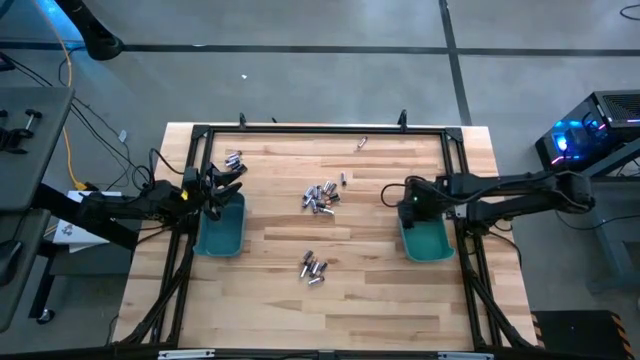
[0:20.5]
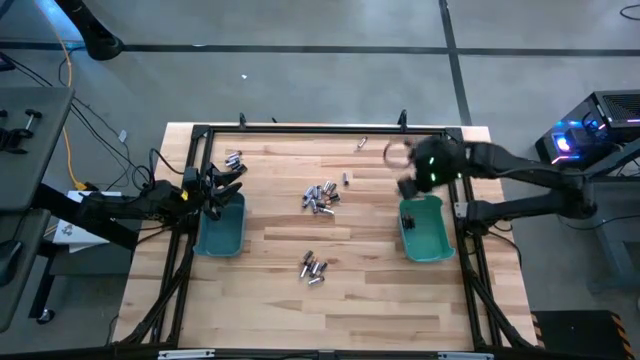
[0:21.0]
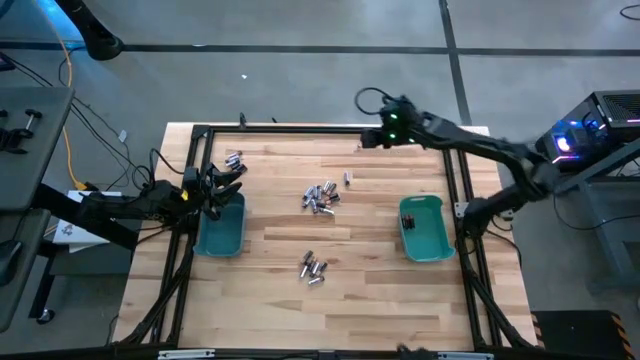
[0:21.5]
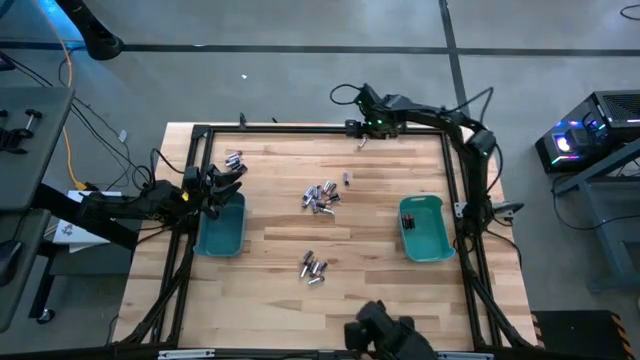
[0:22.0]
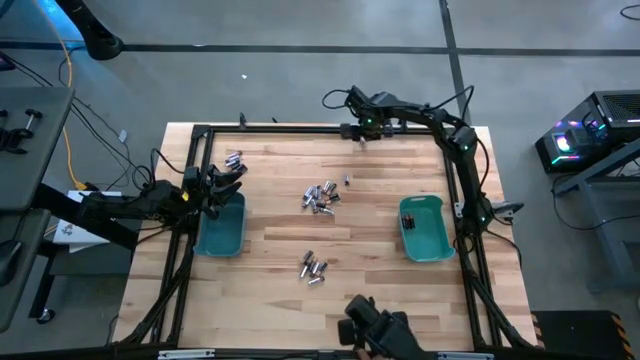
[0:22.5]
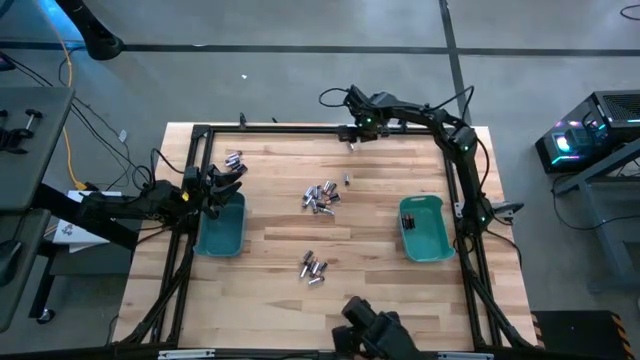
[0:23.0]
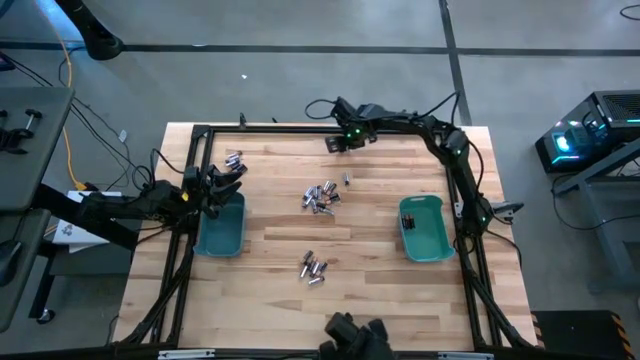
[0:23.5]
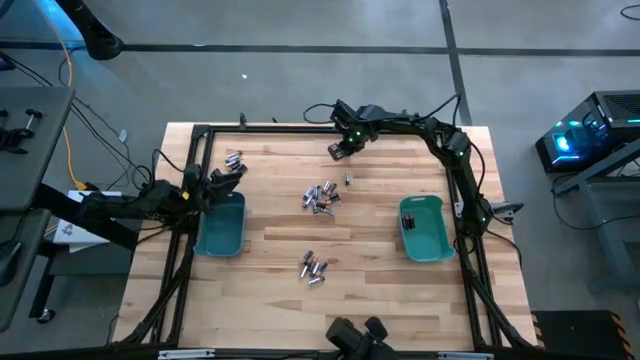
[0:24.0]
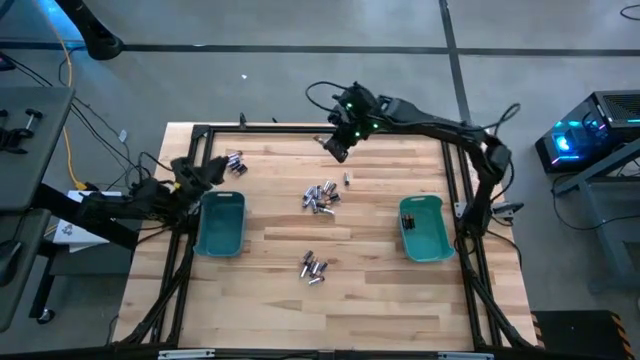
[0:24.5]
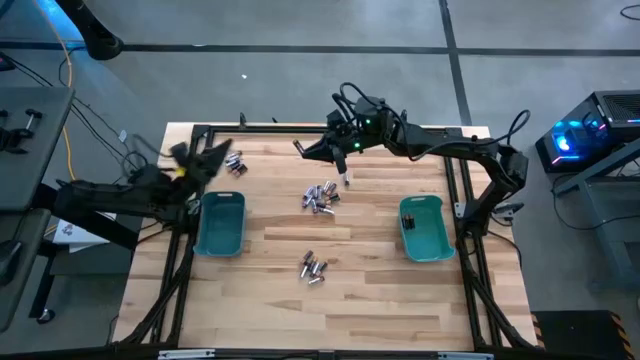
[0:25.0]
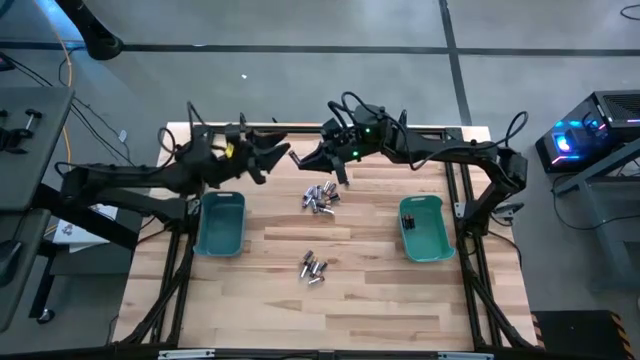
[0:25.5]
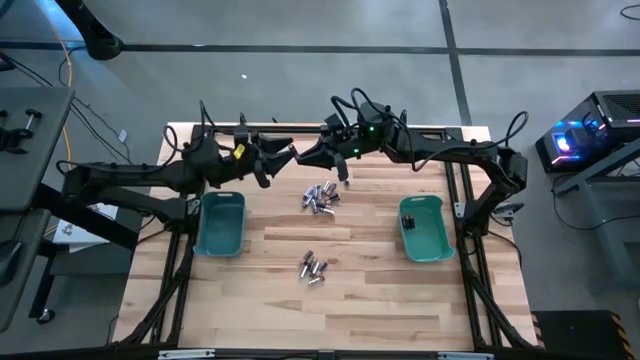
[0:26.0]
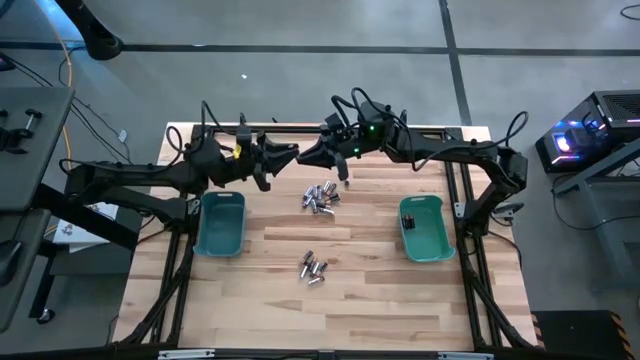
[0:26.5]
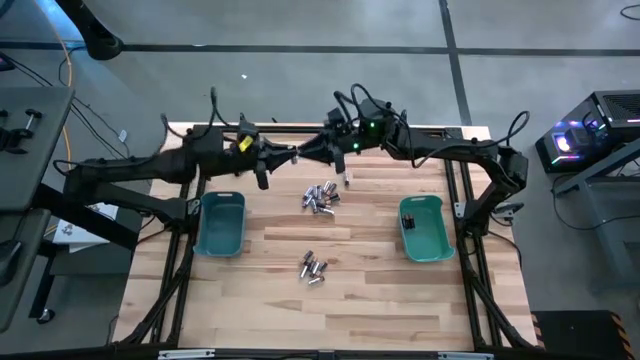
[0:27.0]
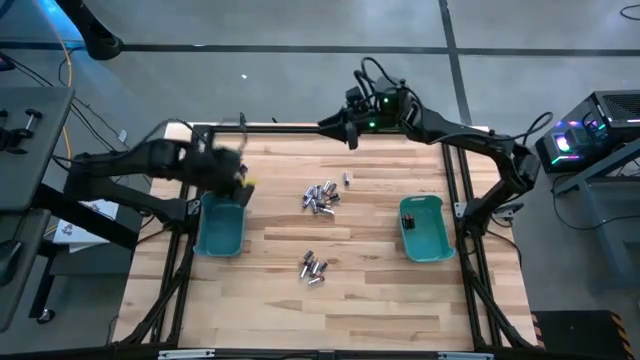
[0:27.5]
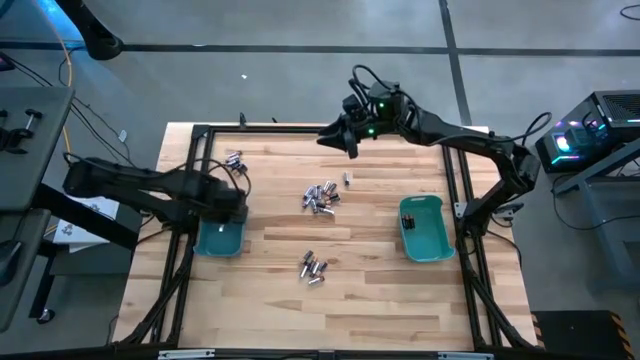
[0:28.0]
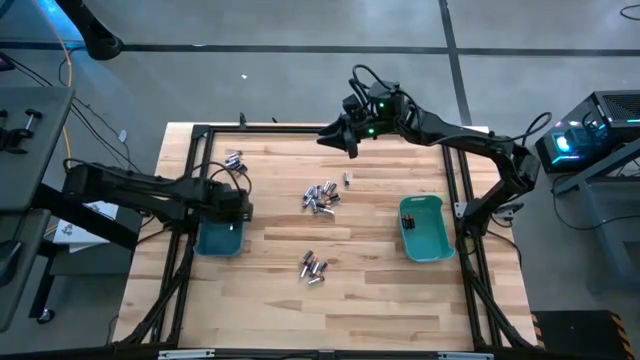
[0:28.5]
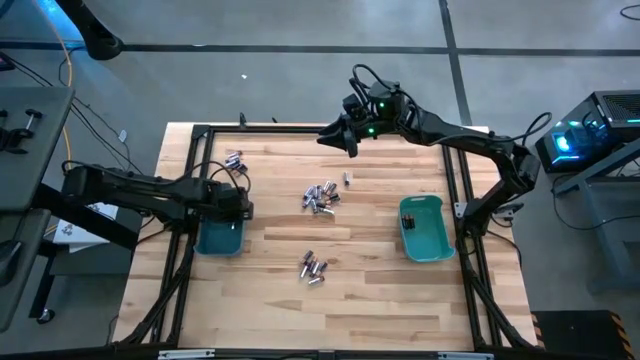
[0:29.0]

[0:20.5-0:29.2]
Task: Sort batteries
Put the silver battery into the blue bin

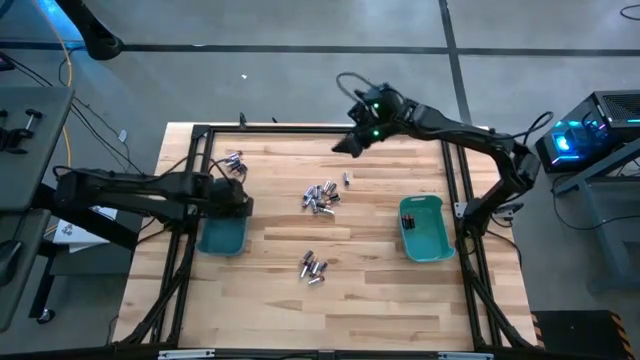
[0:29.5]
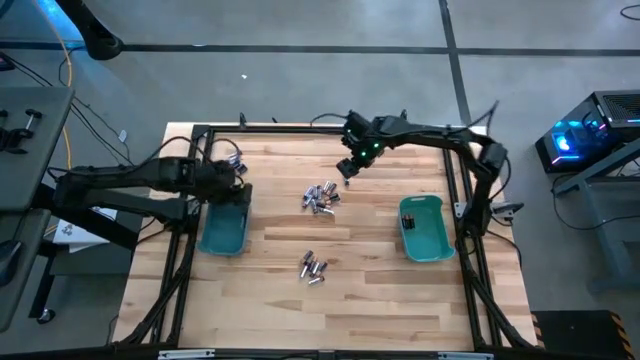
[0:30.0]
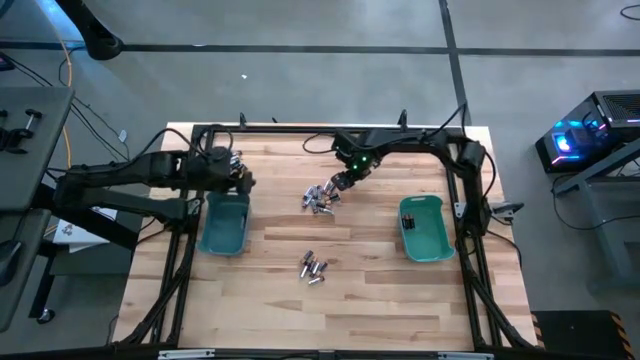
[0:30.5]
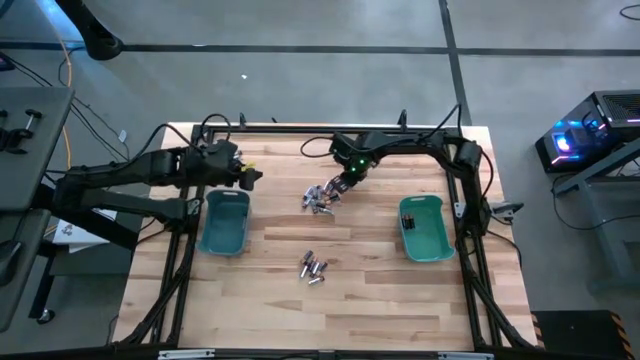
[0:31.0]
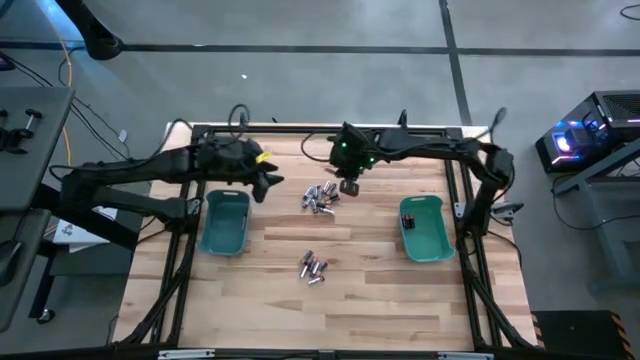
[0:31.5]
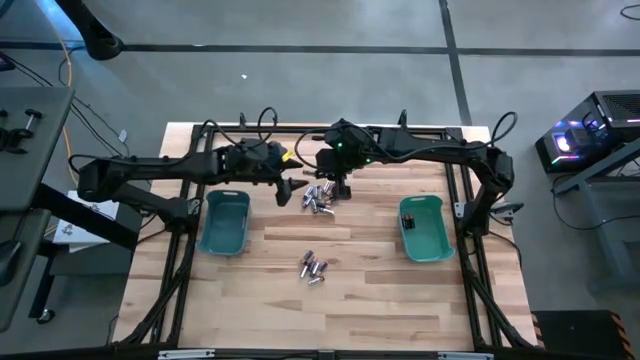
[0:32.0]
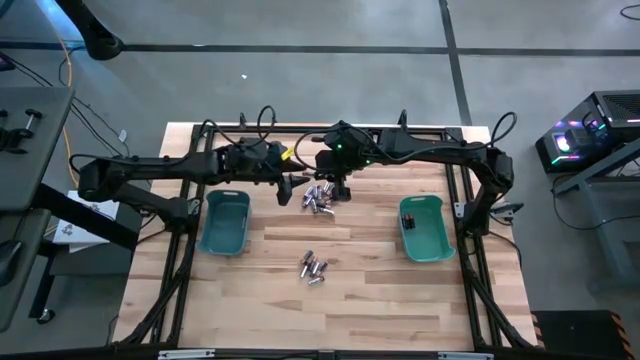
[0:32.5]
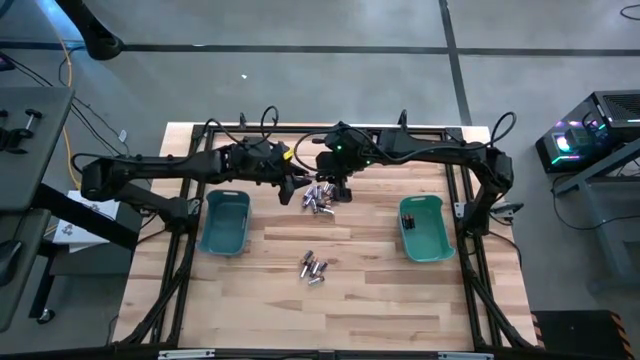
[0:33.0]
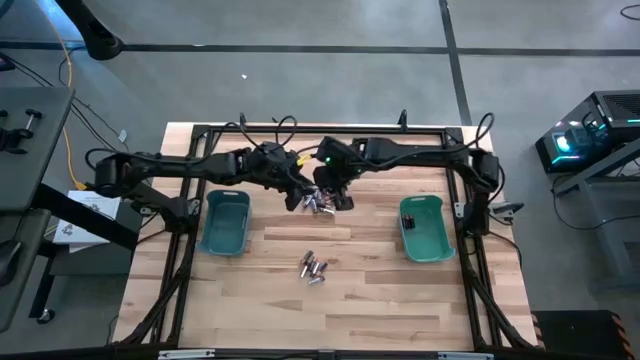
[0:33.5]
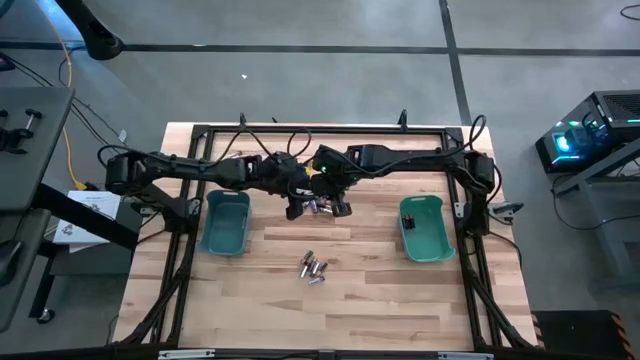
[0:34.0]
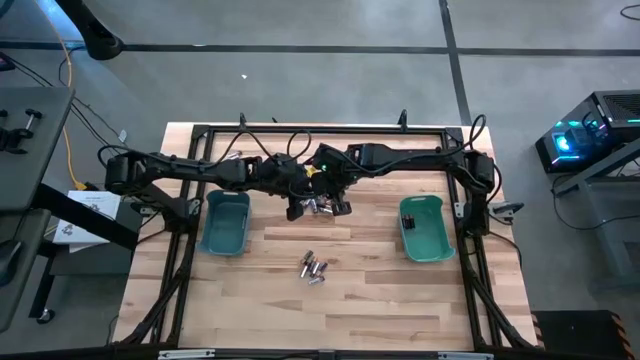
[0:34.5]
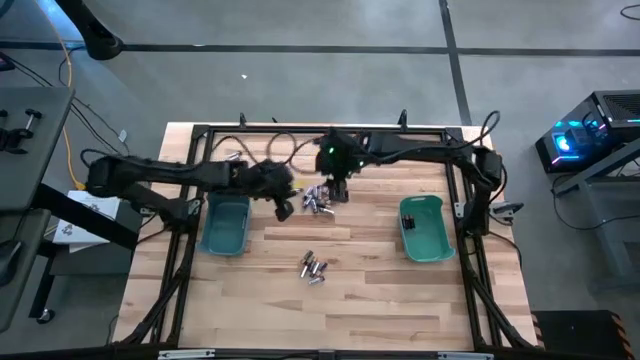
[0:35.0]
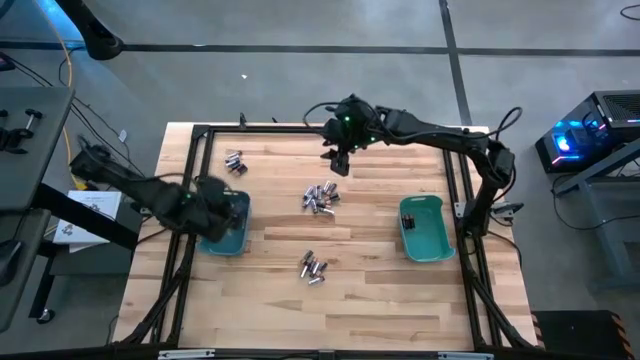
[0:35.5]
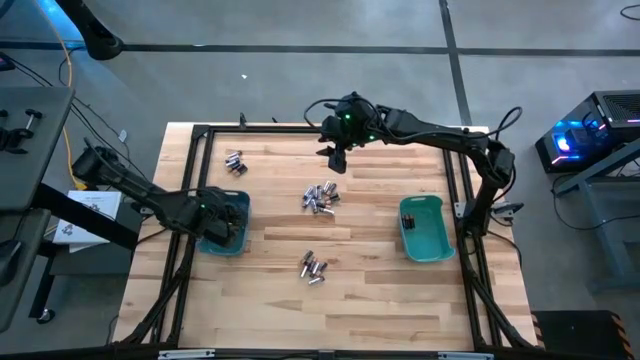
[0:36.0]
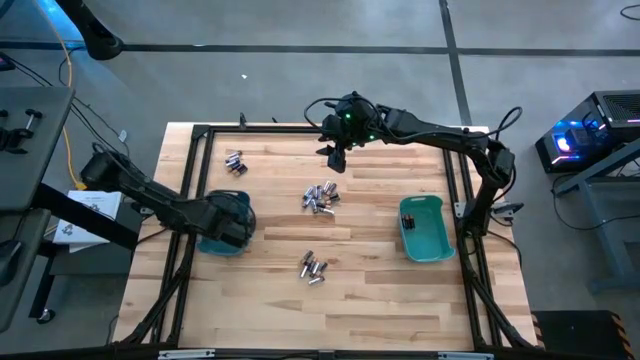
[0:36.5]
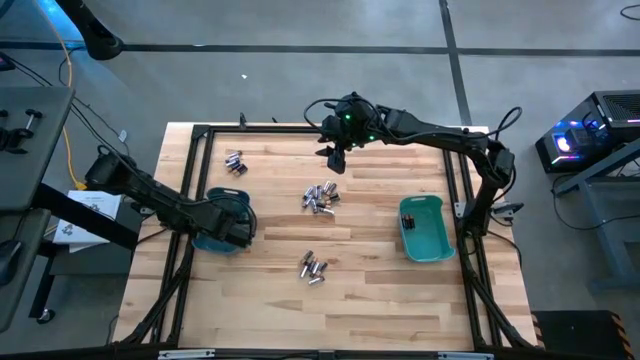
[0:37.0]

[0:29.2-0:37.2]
Put the silver battery into the blue bin

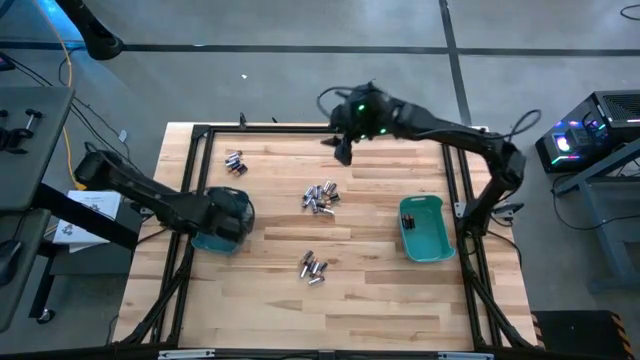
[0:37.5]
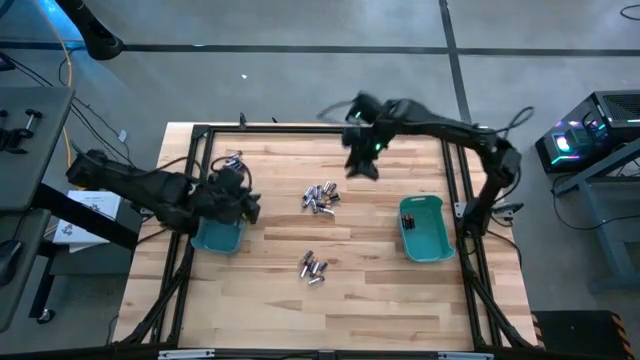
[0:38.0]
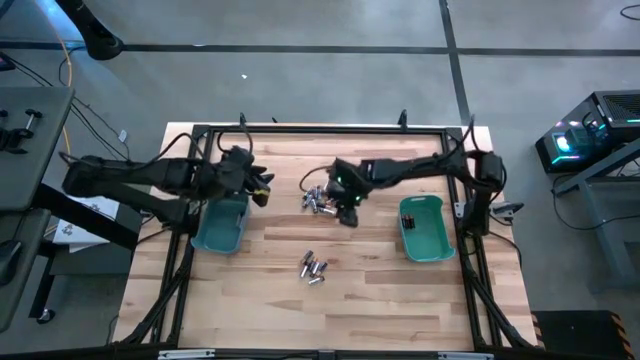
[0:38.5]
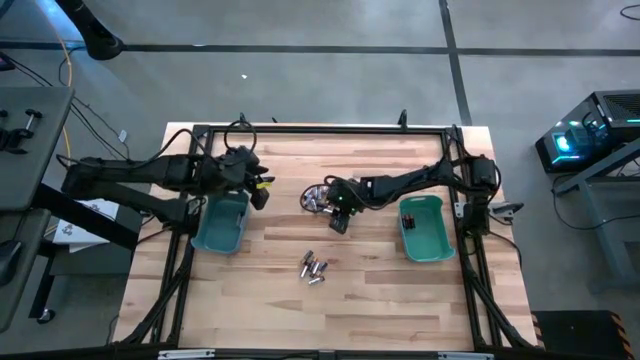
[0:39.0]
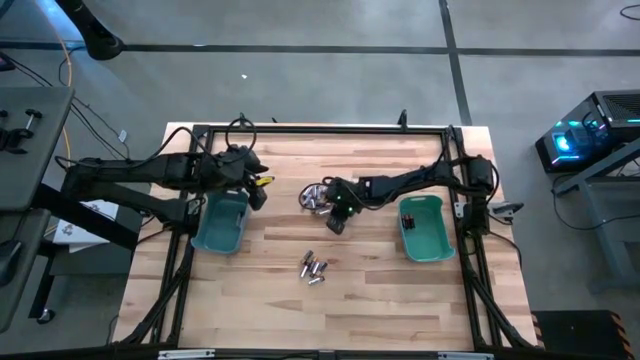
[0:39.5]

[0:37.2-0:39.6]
Put the silver battery into the blue bin

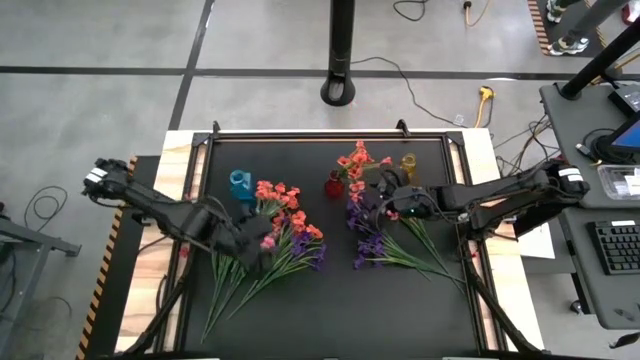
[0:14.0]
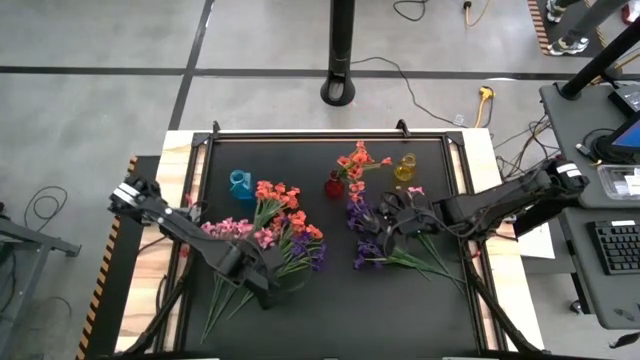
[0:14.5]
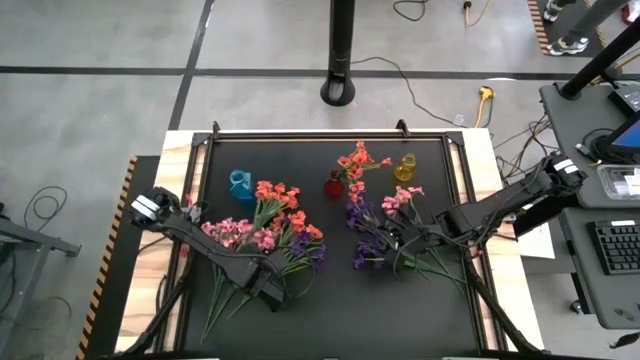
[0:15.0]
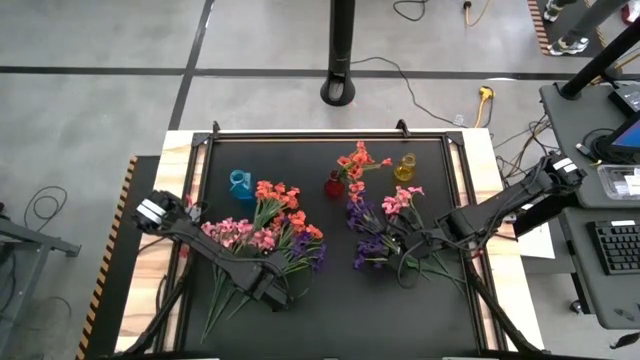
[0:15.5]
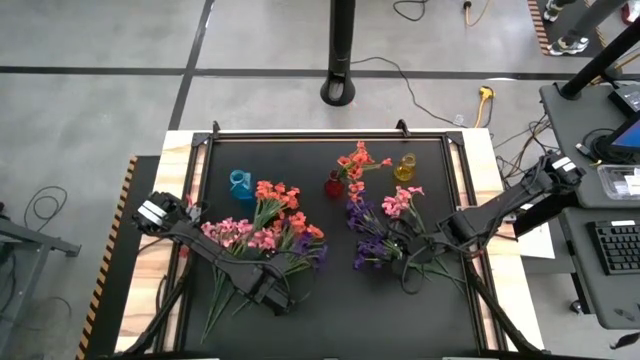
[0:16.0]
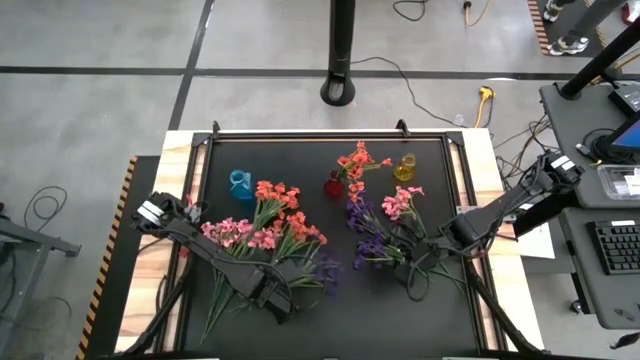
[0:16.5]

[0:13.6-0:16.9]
Task: Sort flowers into vase by color
Put the bottom left violet flowers into the blue vase
